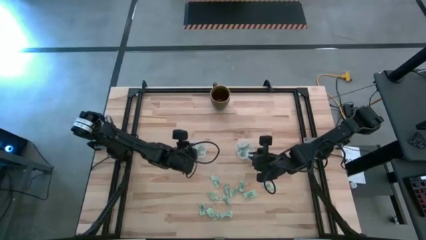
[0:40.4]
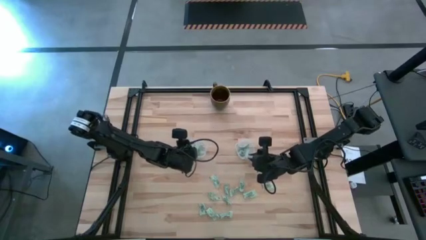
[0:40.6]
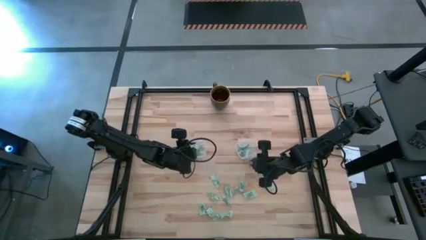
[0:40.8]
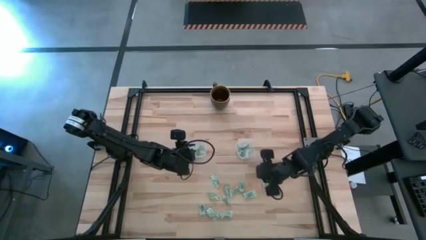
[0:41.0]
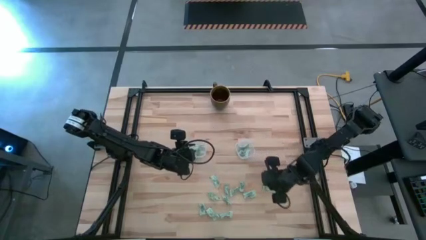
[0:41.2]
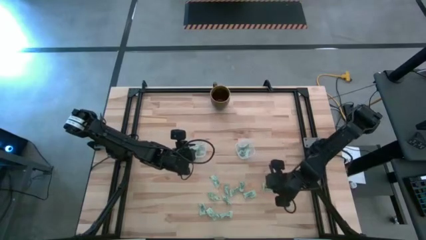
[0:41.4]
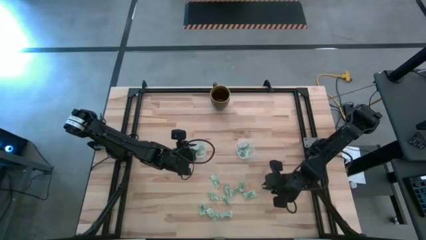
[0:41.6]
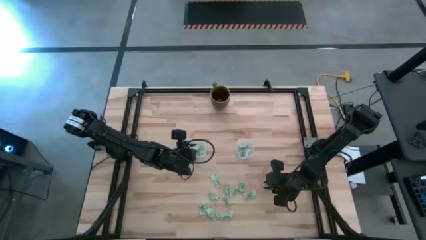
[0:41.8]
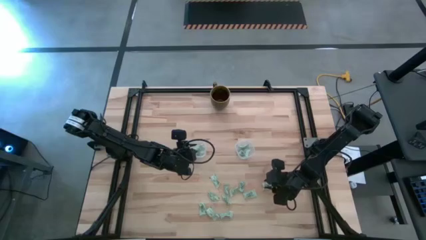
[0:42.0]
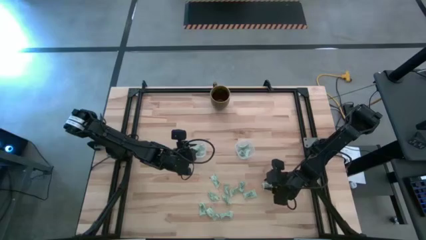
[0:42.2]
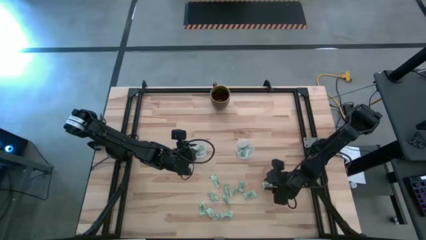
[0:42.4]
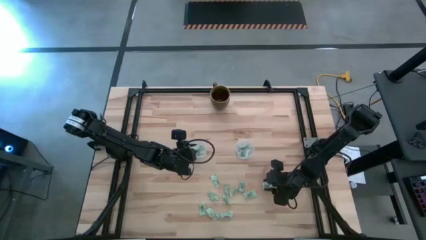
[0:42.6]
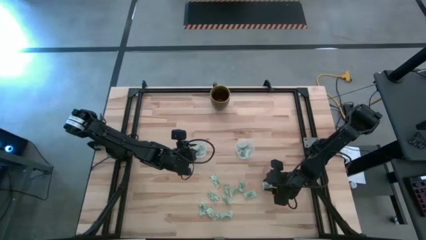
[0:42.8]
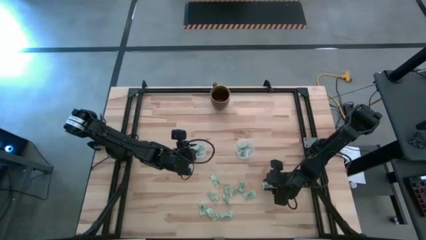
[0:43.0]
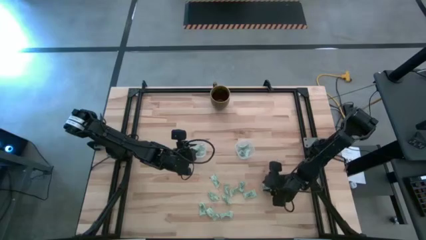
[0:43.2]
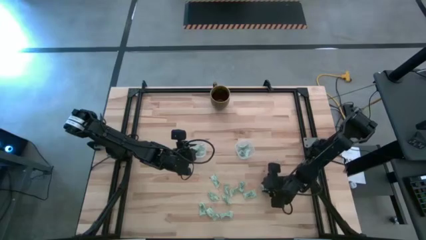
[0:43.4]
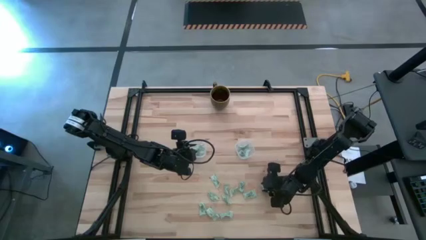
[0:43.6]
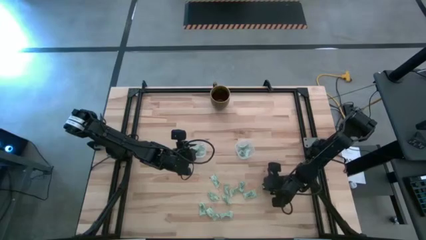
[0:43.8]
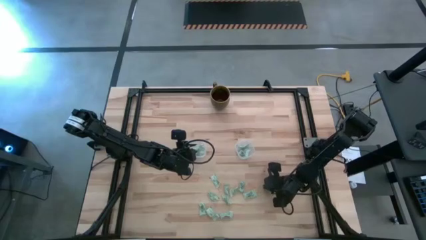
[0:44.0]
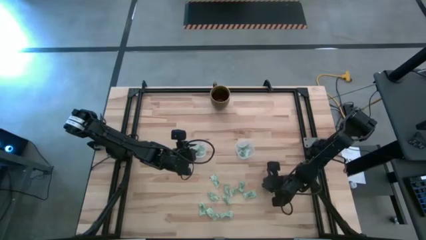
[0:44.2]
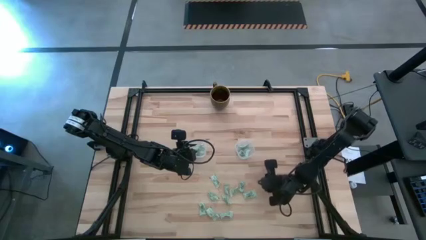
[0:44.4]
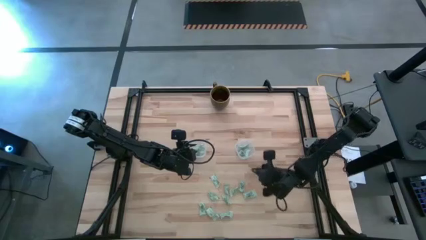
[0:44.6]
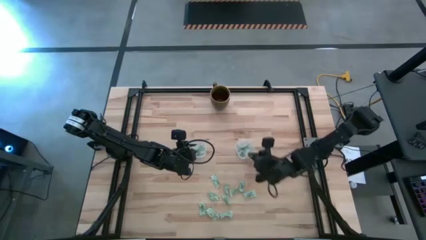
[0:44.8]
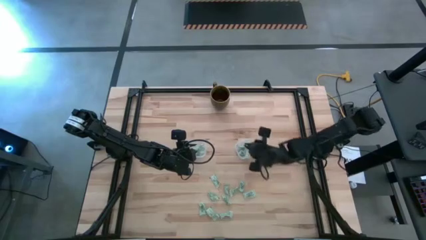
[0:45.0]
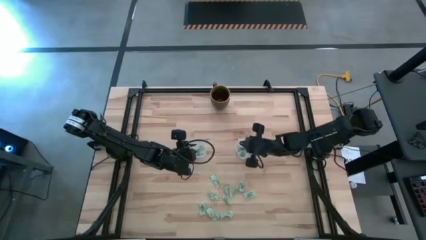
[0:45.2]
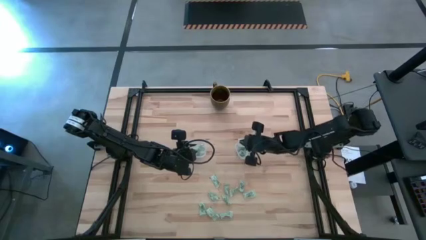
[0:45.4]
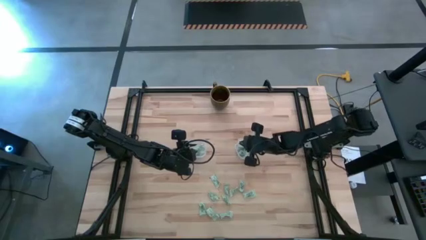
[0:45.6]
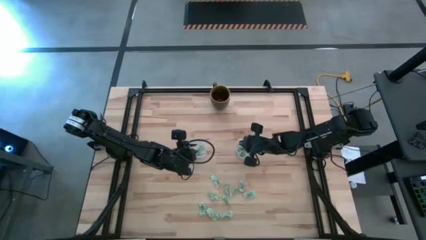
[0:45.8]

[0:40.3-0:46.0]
Task: Pick and place Stevia / Truvia into bins
Put the white stevia packet into the right transparent container

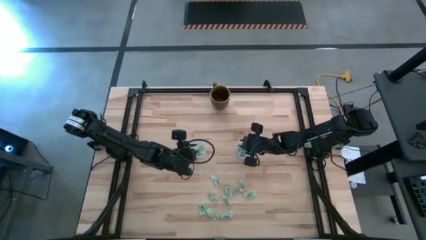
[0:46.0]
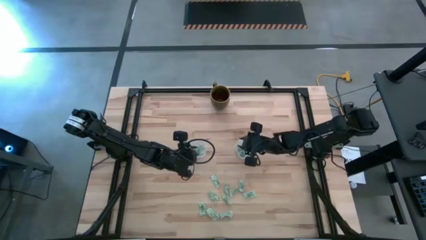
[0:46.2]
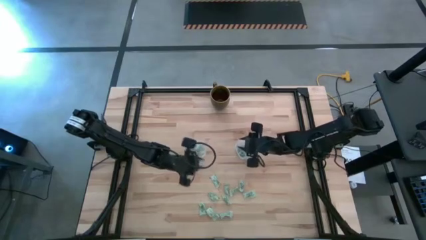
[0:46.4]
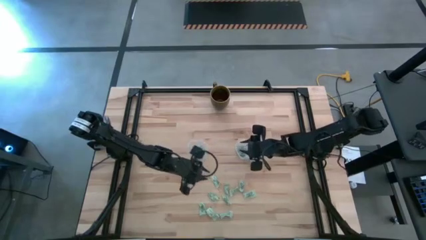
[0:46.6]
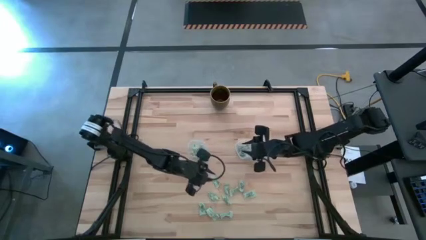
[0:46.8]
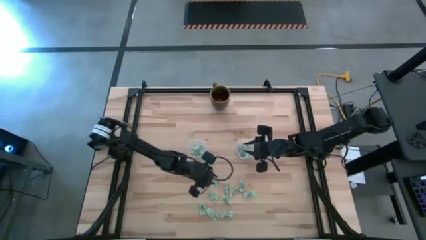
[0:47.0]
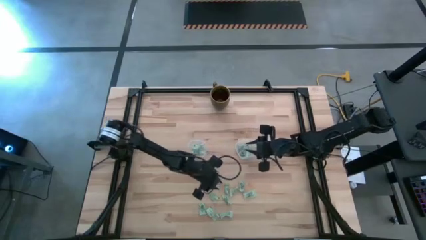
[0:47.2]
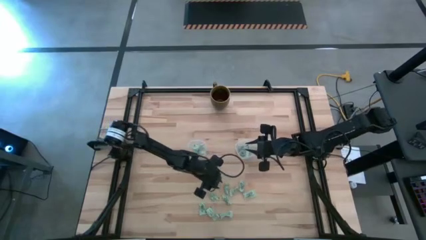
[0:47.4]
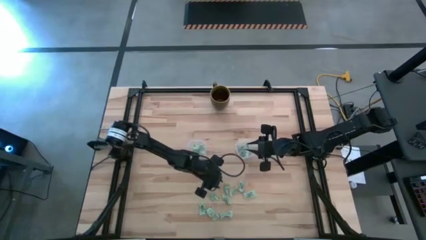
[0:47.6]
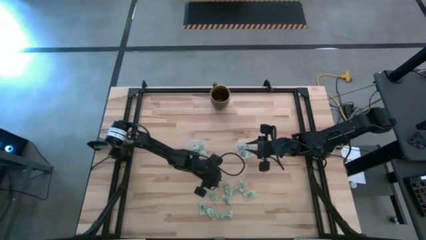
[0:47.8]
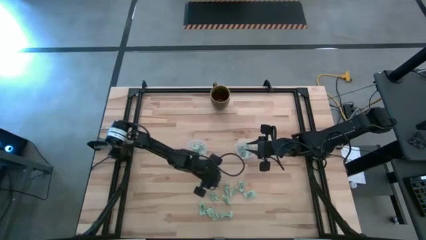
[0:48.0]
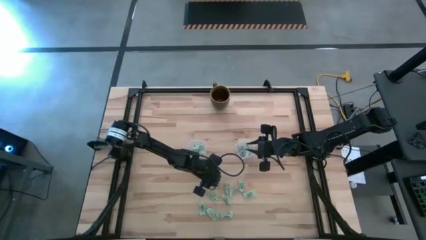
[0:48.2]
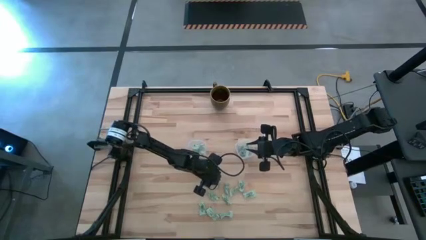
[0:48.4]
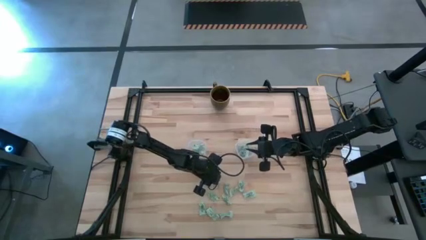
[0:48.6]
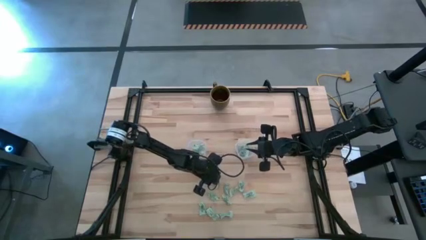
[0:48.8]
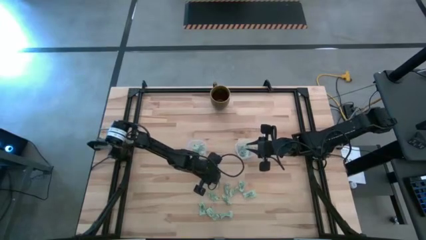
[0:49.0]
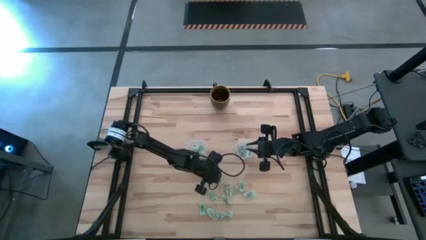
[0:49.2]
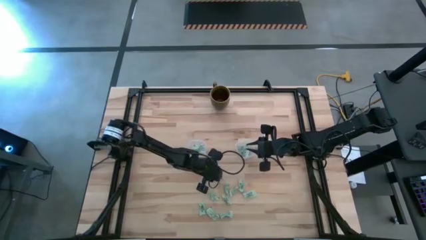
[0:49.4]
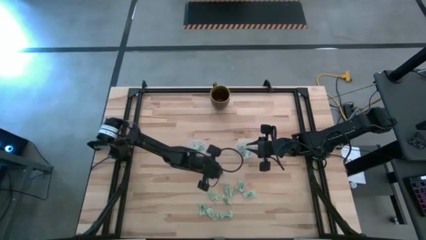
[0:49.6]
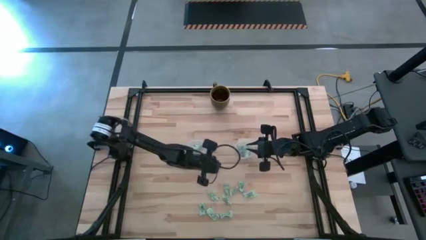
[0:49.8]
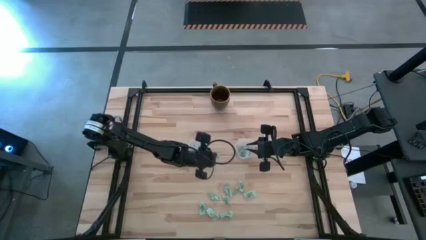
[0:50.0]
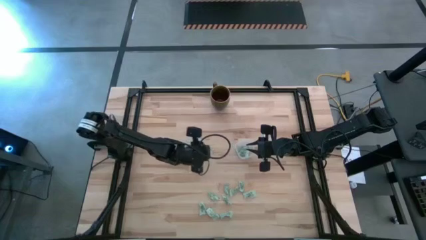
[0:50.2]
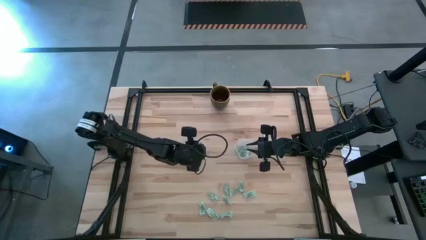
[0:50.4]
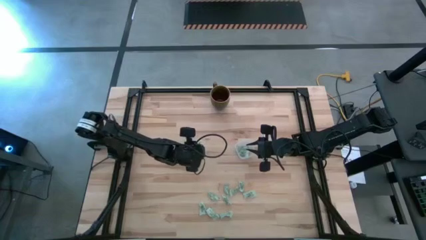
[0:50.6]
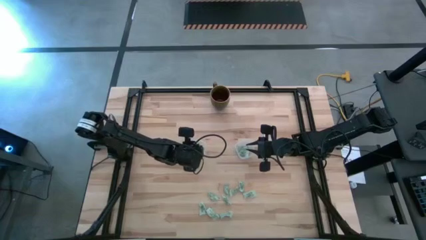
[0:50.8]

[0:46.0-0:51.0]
Put the white stevia packet into the left transparent container

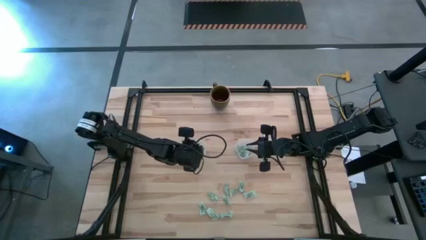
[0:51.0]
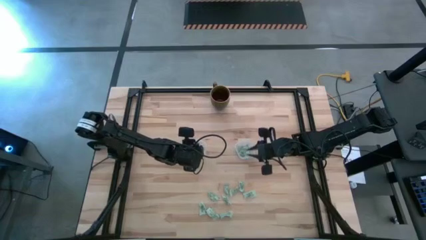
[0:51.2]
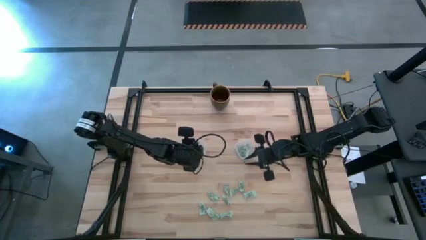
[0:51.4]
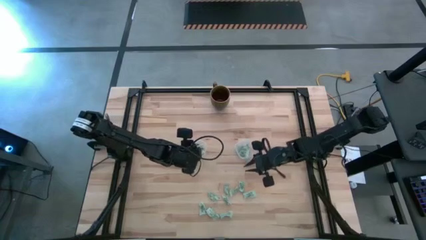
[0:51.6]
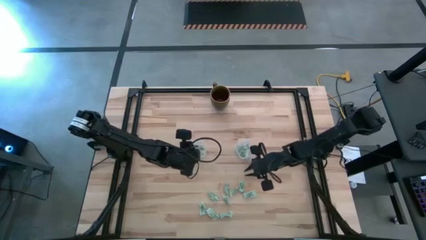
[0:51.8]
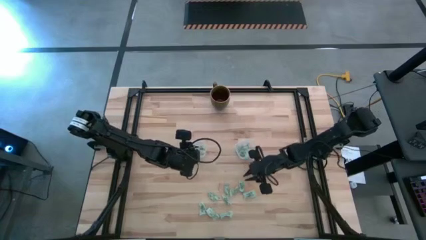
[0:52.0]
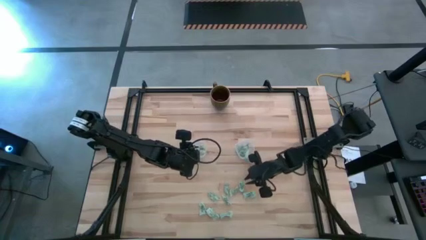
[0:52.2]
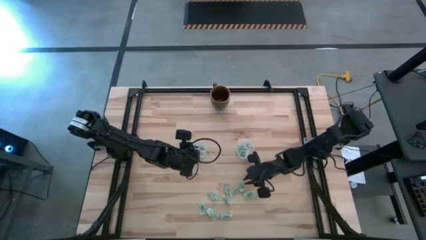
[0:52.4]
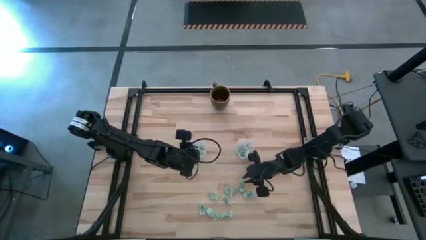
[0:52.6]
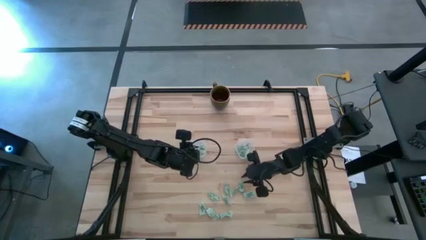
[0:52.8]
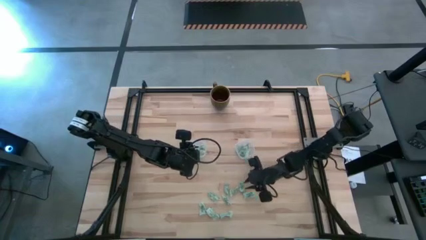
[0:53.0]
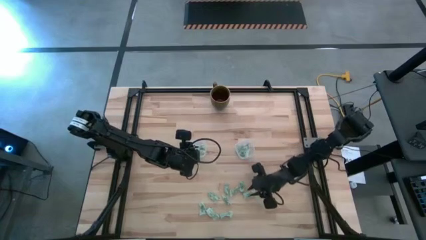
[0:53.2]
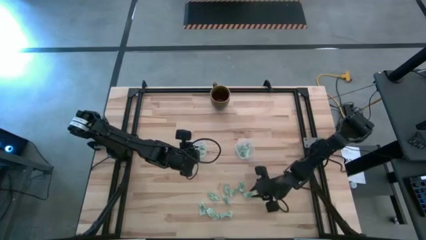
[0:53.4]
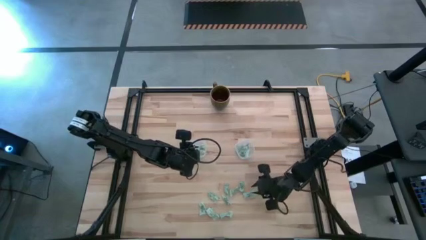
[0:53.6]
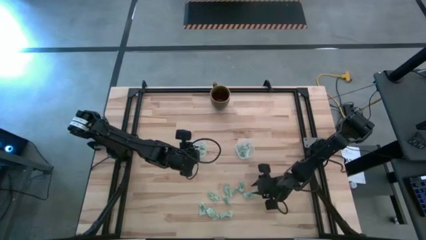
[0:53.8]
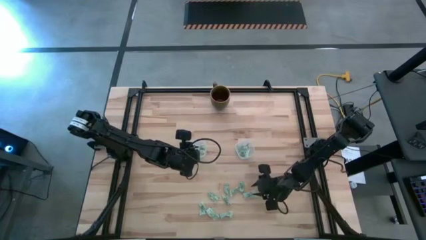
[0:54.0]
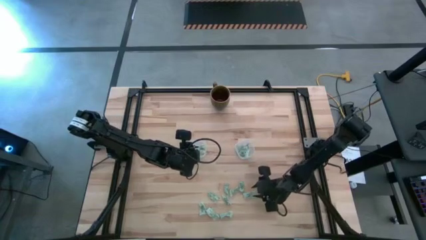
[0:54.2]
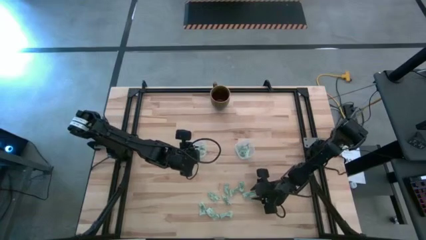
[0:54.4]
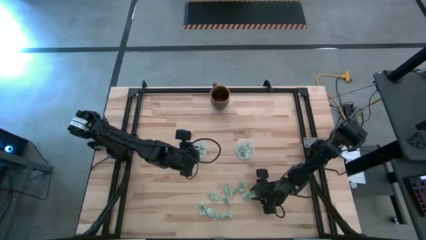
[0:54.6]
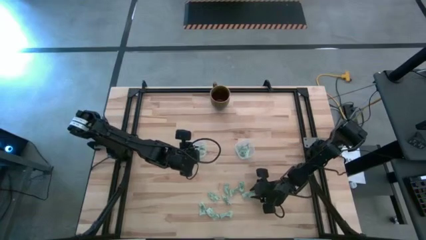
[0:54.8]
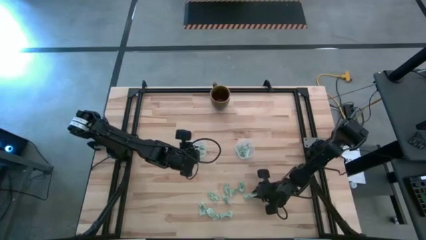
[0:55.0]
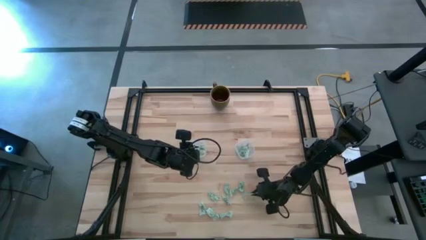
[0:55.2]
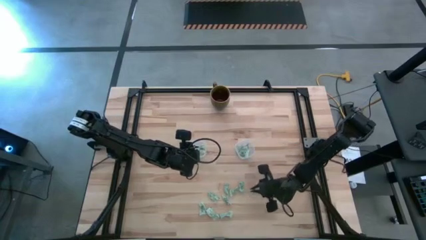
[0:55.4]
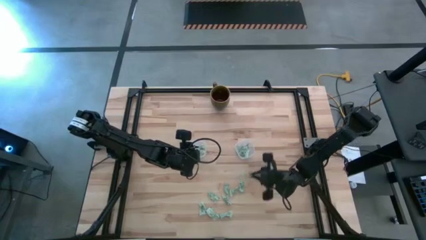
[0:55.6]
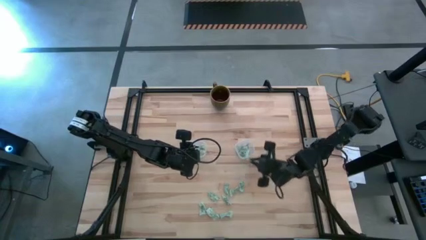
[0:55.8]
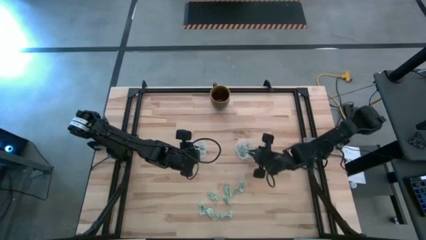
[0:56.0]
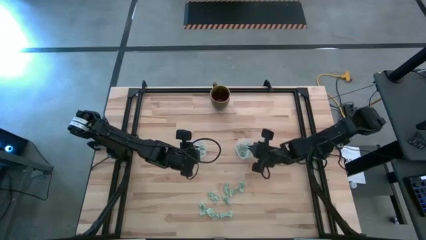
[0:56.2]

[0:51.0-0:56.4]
Put the white stevia packet into the right transparent container
